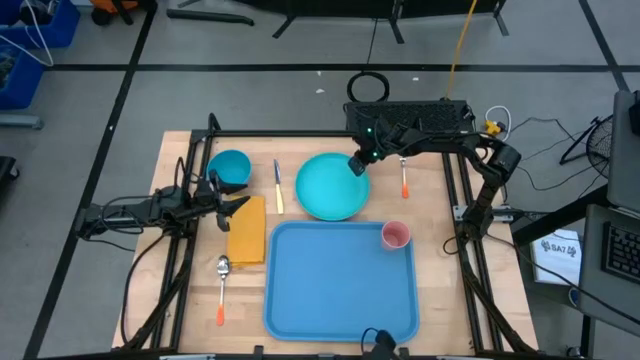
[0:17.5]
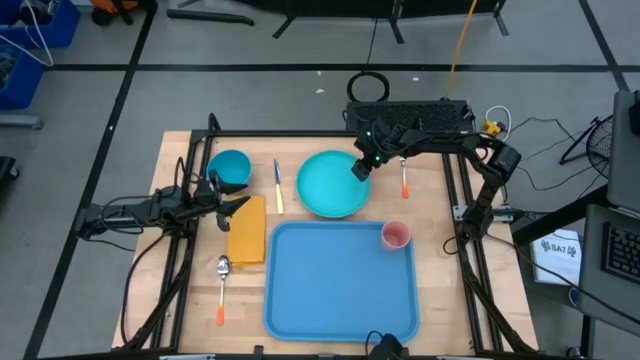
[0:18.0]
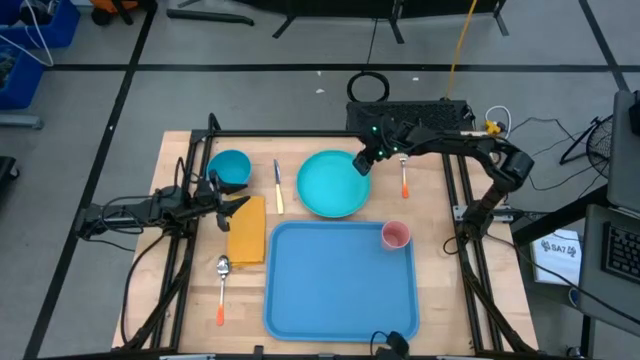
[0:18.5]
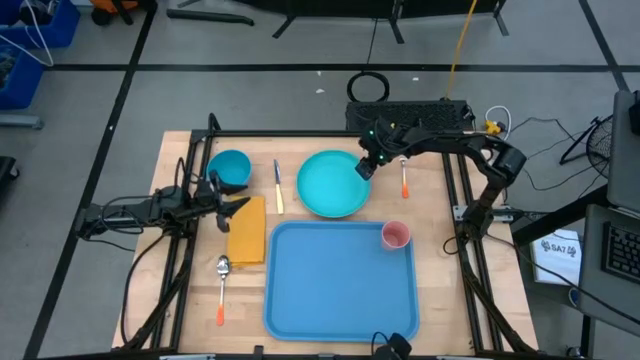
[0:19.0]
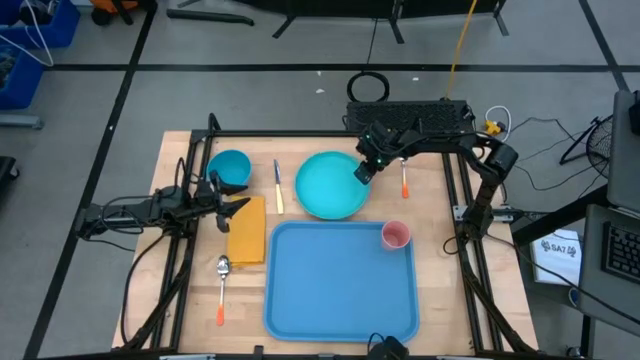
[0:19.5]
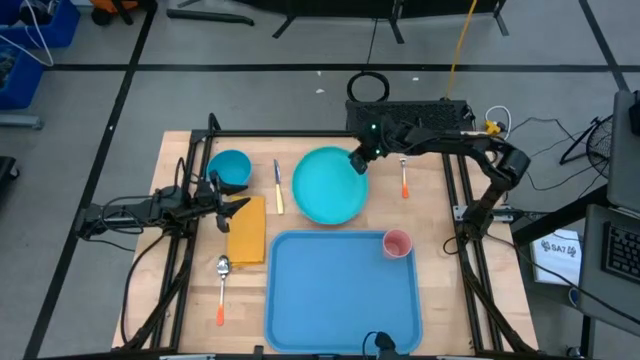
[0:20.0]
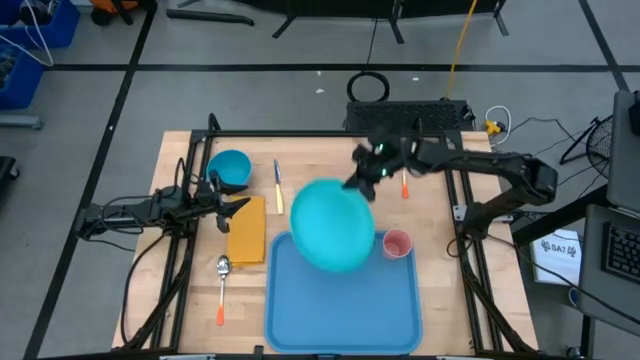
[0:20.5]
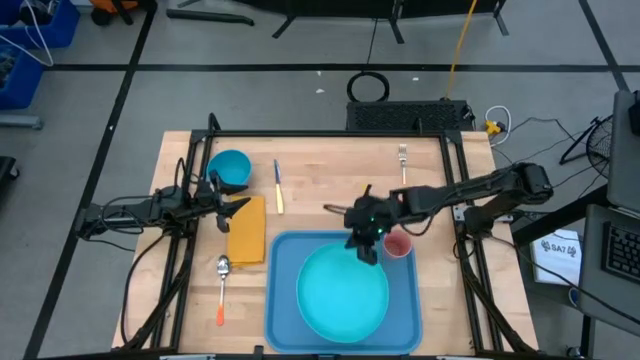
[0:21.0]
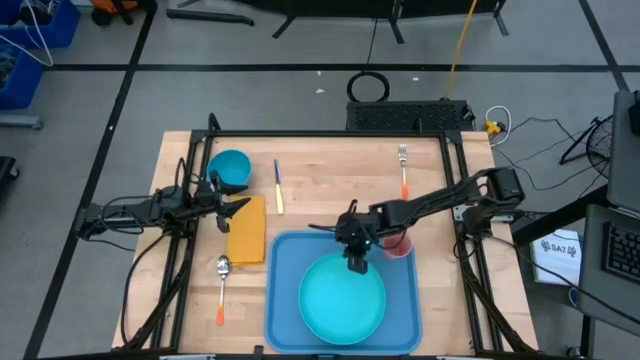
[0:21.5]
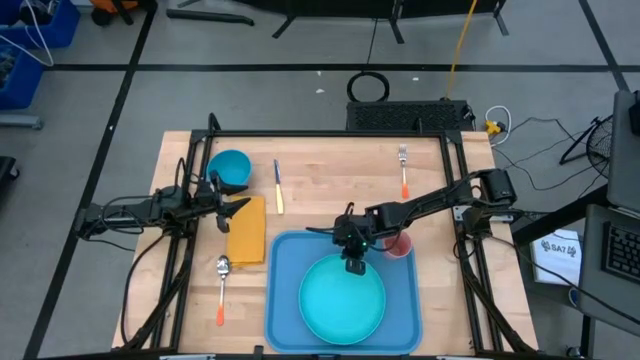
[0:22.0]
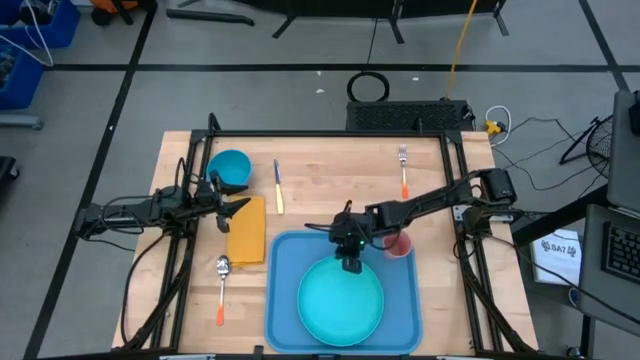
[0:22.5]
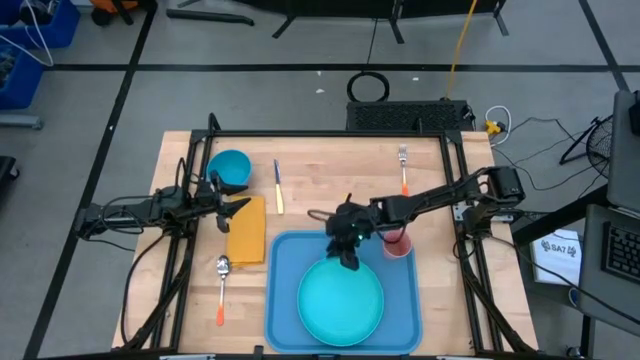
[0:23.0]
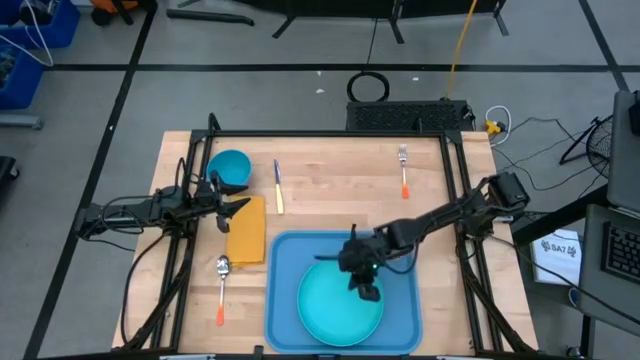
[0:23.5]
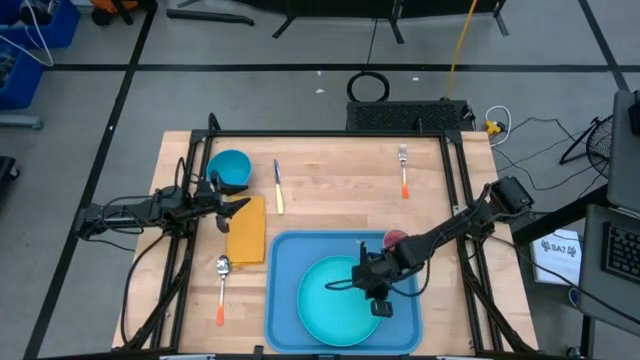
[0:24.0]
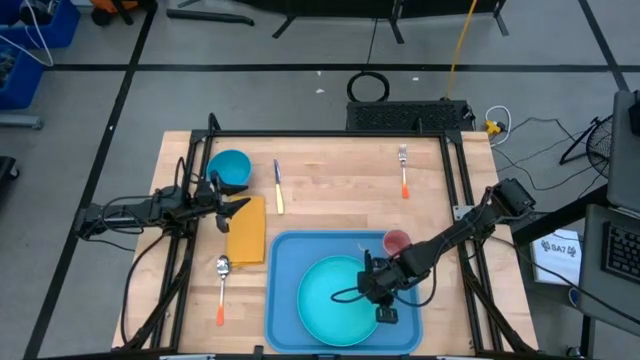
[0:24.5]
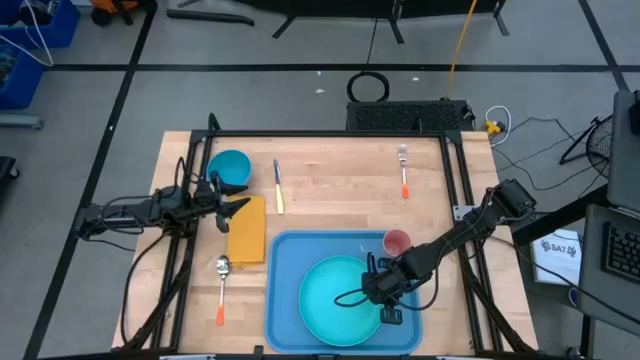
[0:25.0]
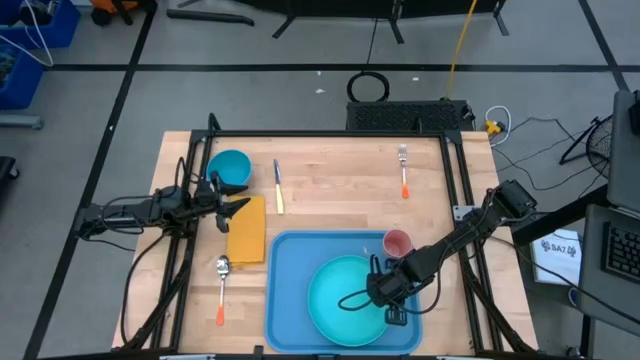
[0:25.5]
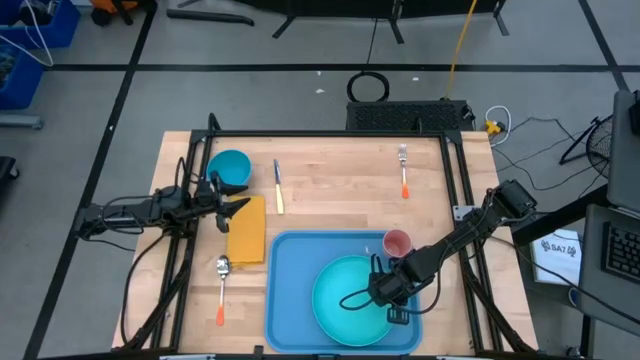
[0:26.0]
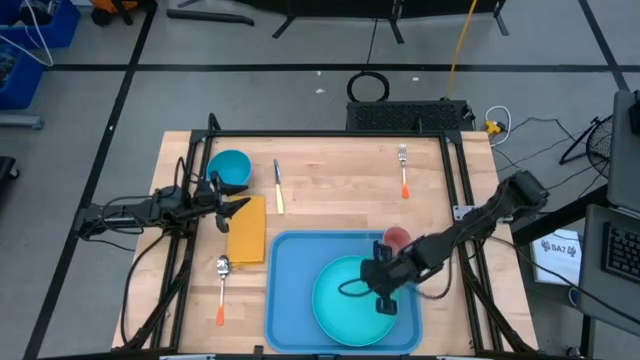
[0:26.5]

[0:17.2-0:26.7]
Task: Set up tray
Put the green plate on the blue tray

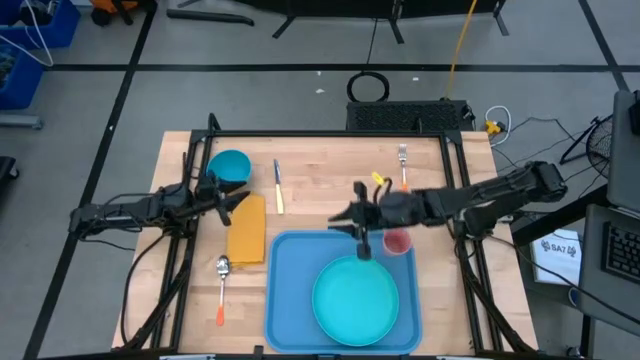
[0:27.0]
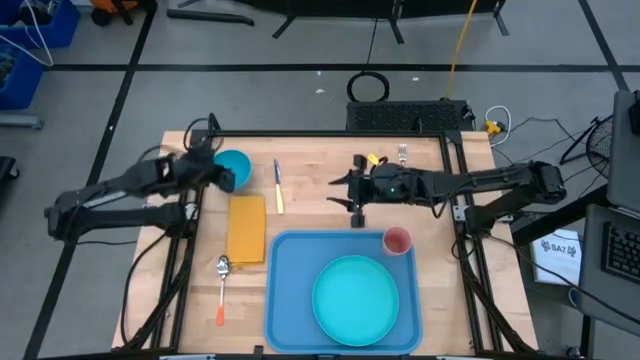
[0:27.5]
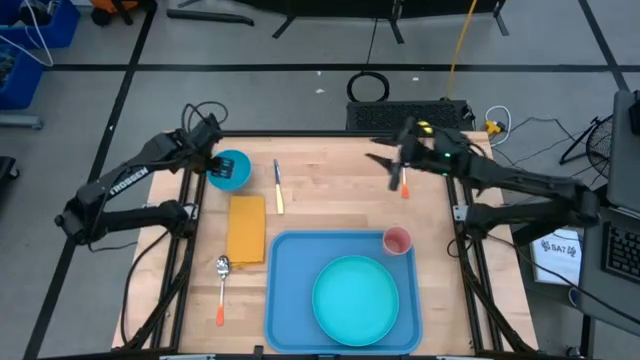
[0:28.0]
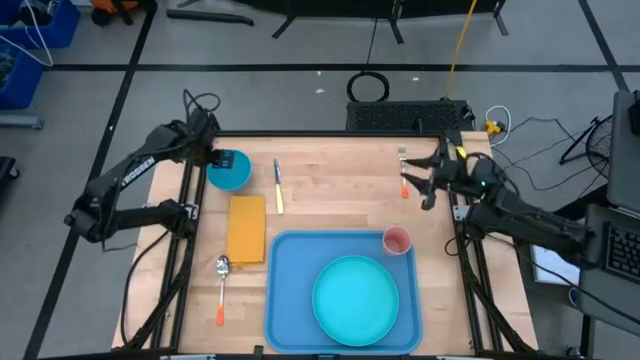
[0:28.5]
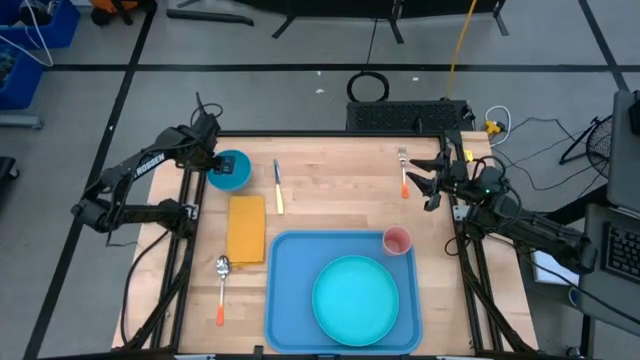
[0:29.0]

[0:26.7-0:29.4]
Put the blue bowl on top of the green plate

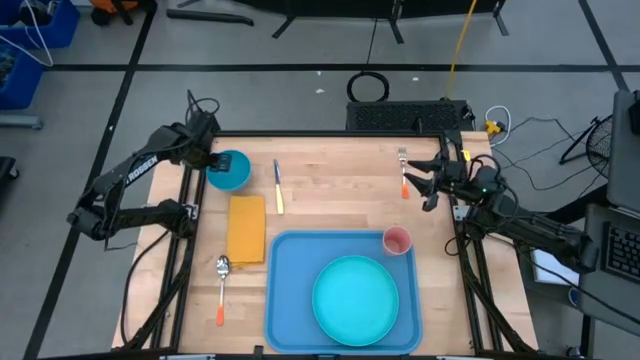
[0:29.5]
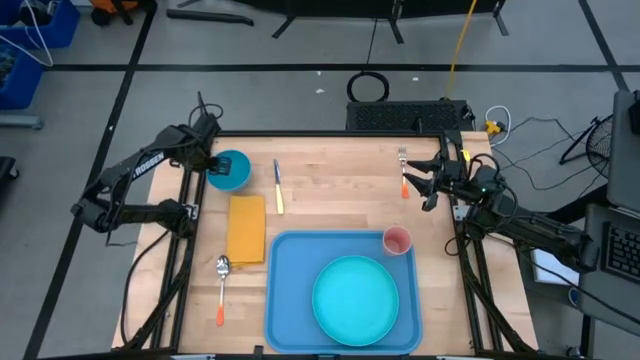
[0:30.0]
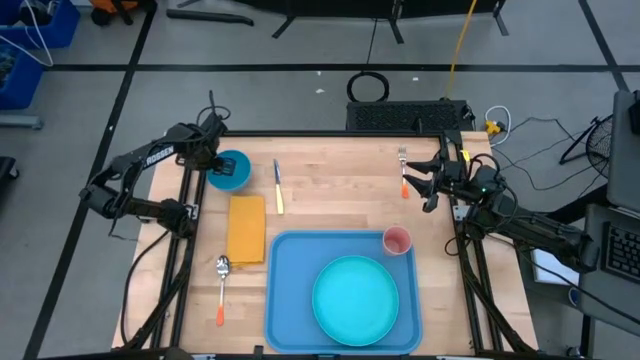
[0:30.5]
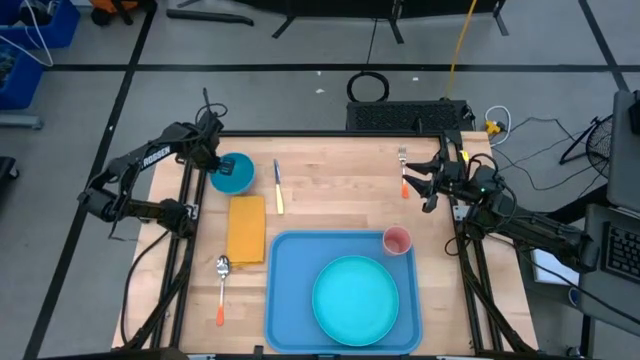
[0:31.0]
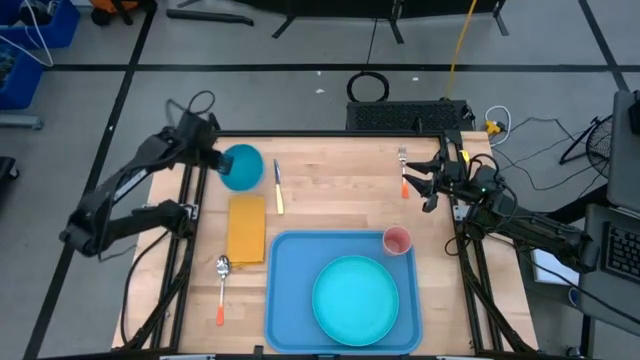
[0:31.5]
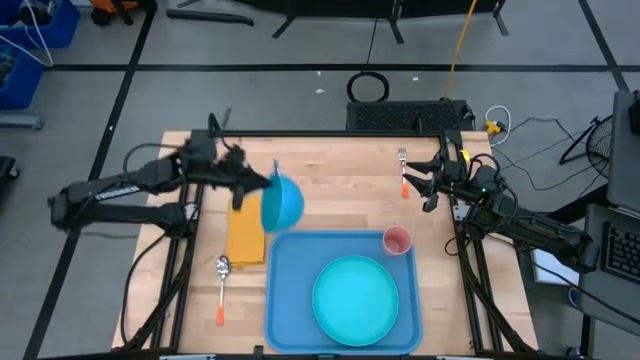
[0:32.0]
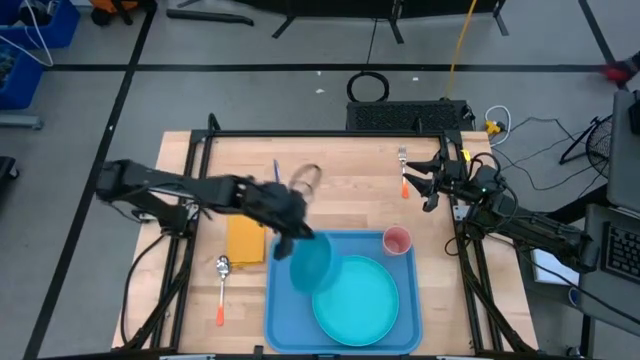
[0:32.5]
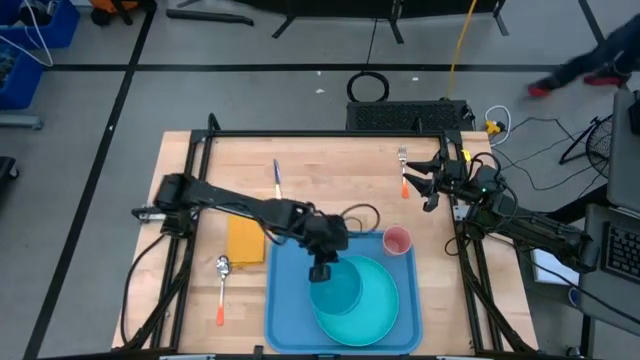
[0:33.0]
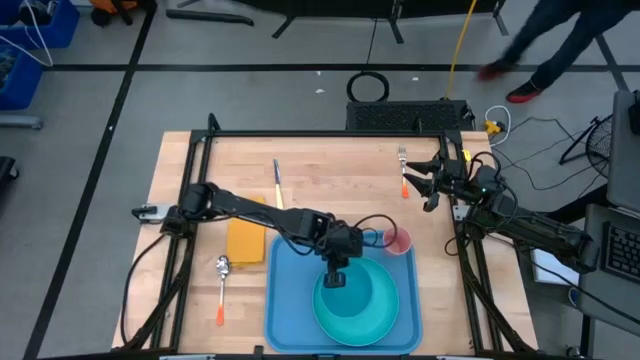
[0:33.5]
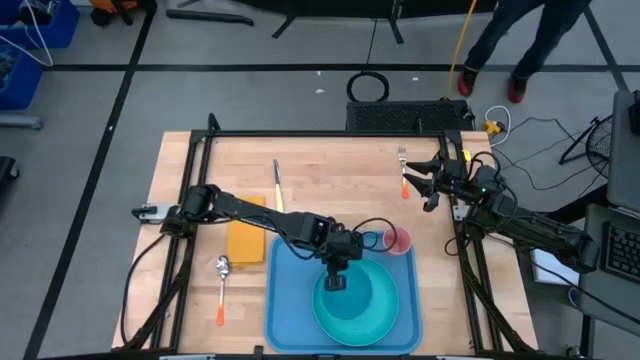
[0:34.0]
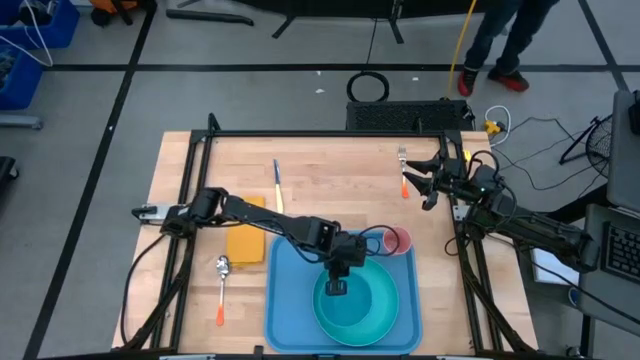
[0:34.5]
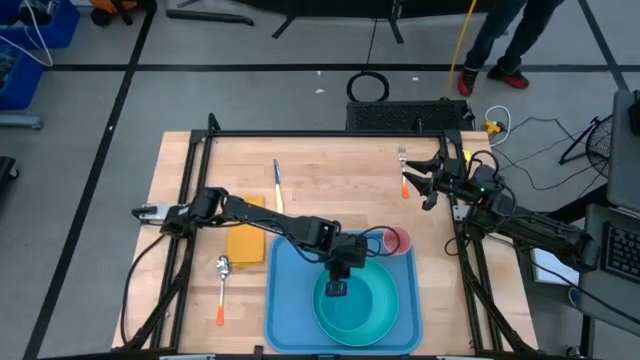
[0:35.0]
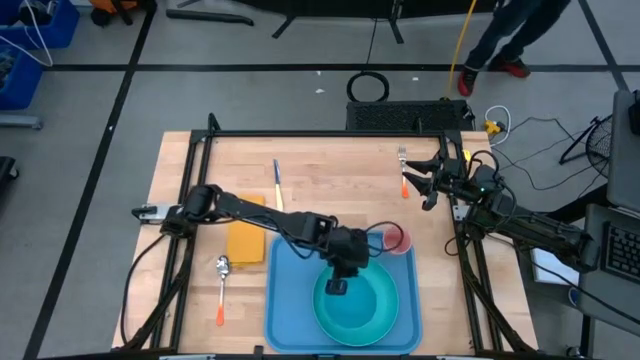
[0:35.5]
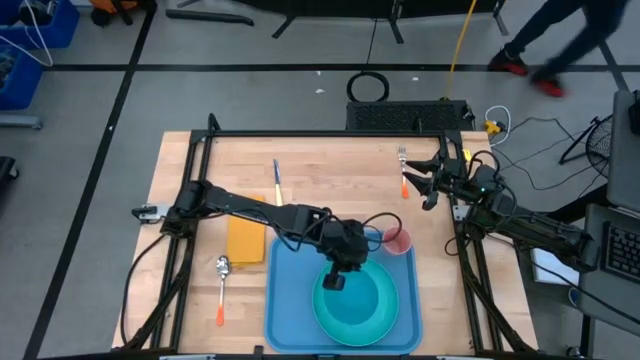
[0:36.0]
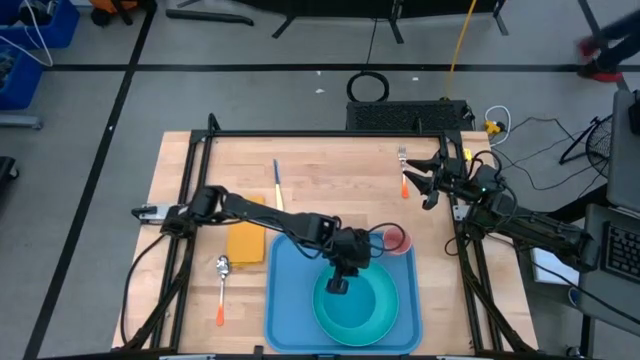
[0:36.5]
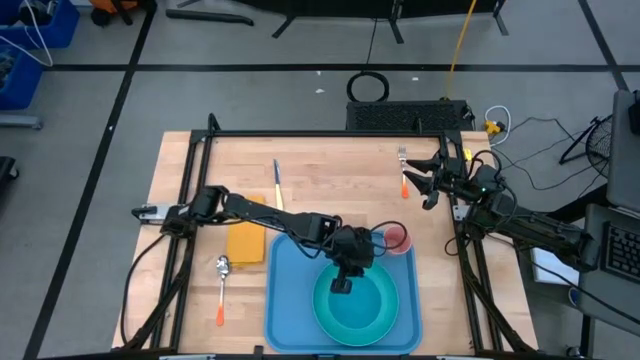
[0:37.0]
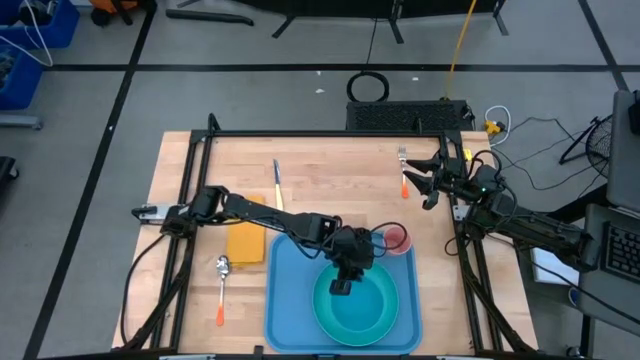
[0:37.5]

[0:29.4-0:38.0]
Put the blue bowl on top of the green plate
